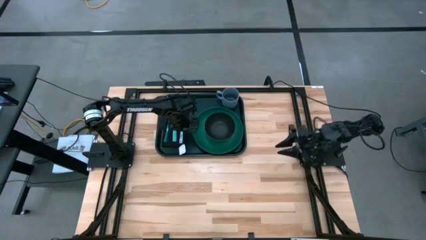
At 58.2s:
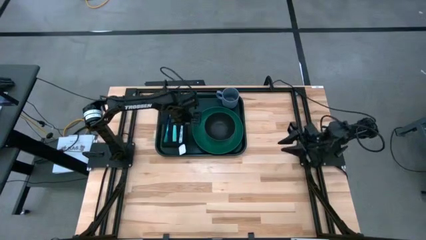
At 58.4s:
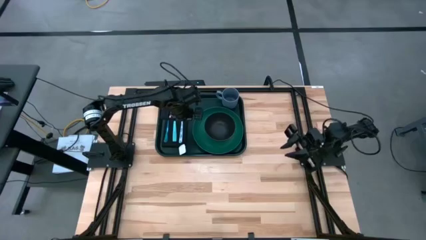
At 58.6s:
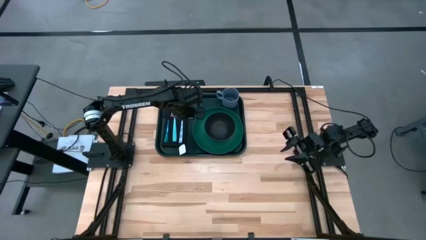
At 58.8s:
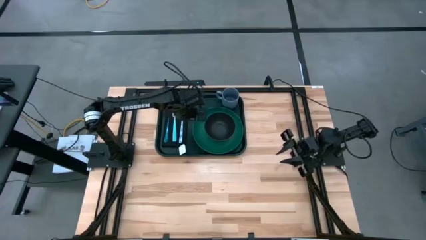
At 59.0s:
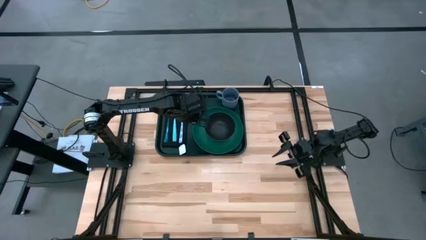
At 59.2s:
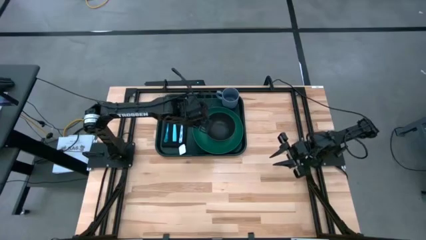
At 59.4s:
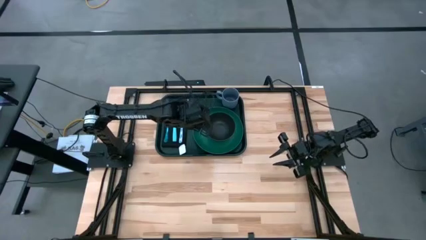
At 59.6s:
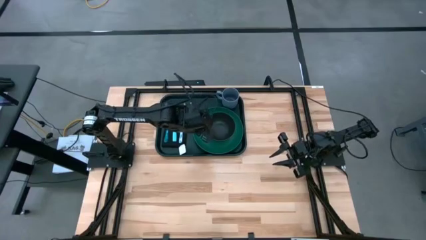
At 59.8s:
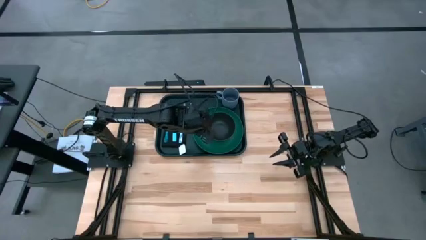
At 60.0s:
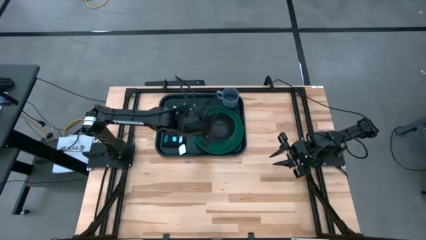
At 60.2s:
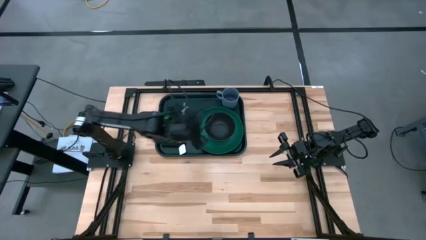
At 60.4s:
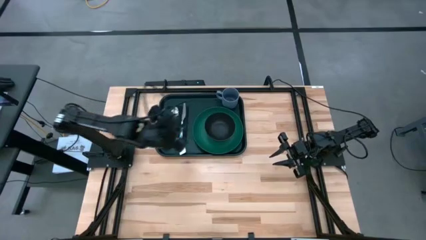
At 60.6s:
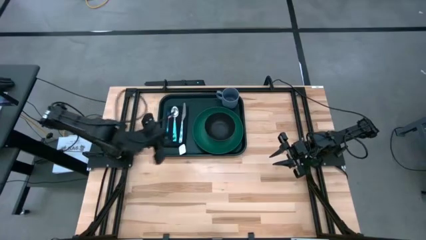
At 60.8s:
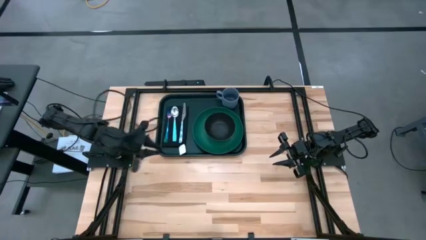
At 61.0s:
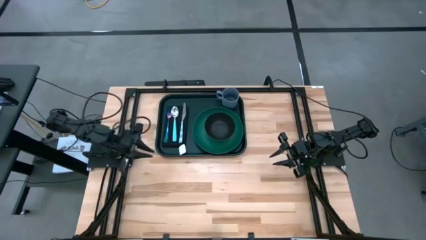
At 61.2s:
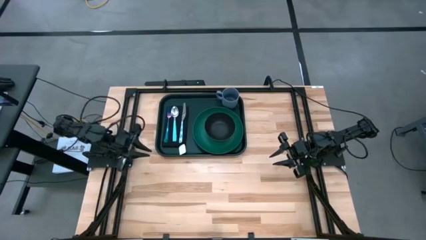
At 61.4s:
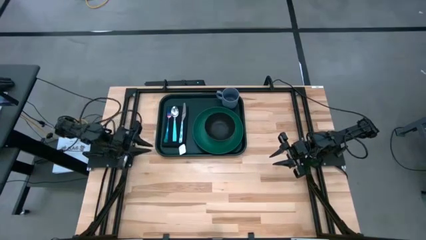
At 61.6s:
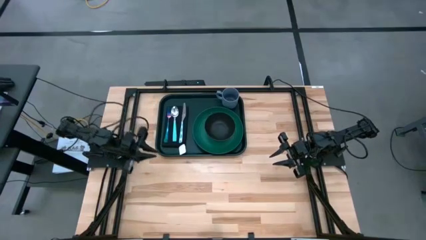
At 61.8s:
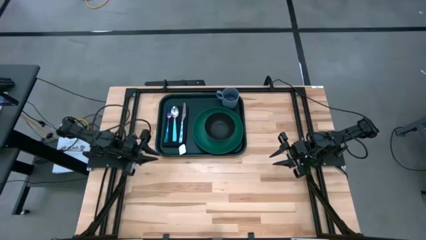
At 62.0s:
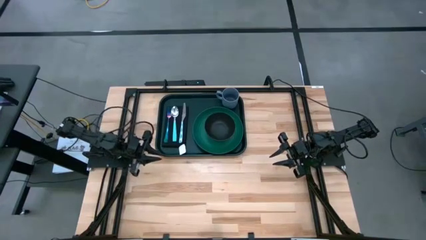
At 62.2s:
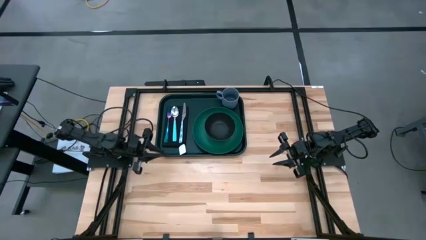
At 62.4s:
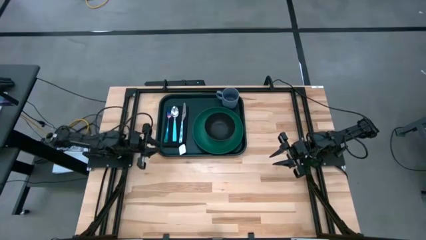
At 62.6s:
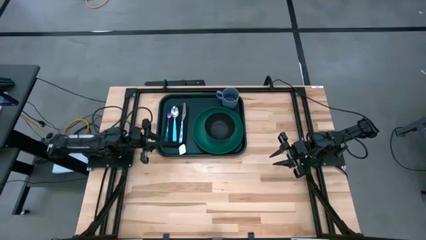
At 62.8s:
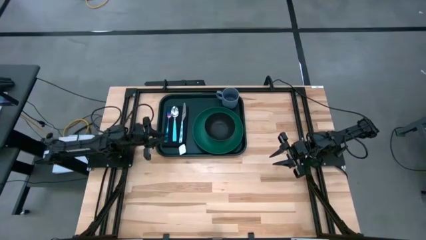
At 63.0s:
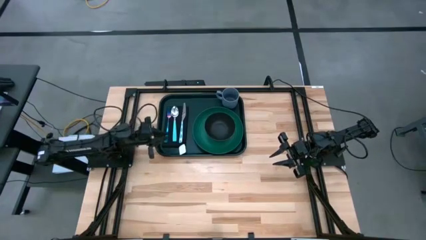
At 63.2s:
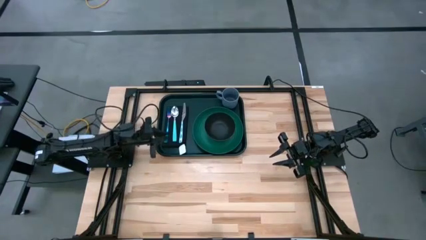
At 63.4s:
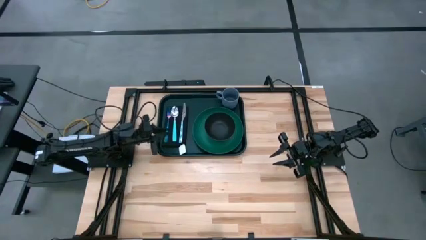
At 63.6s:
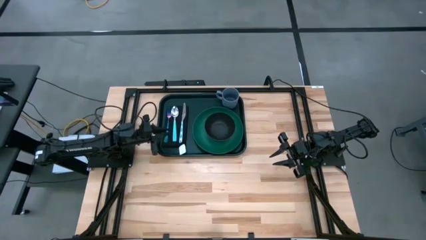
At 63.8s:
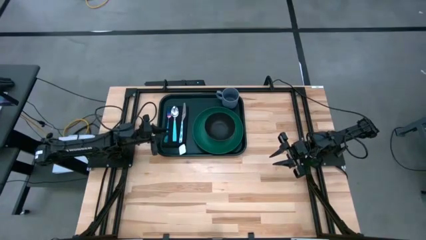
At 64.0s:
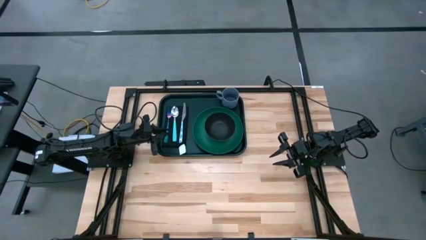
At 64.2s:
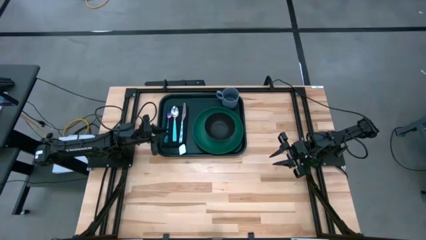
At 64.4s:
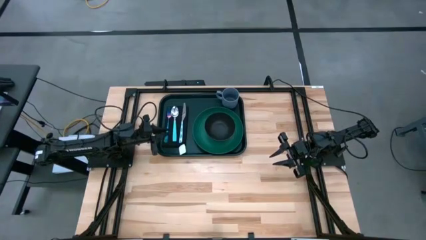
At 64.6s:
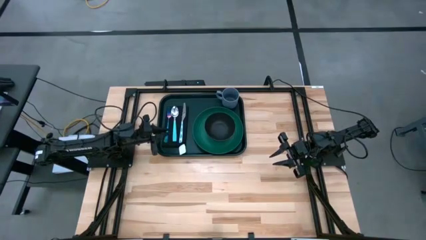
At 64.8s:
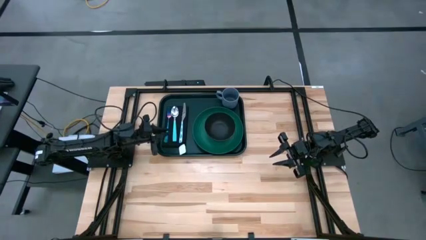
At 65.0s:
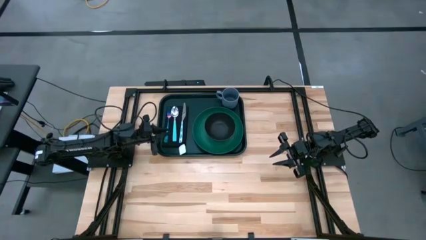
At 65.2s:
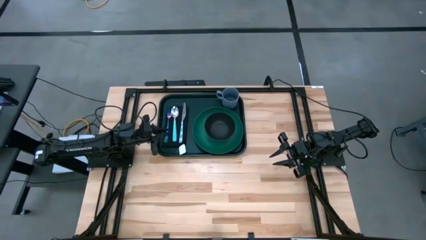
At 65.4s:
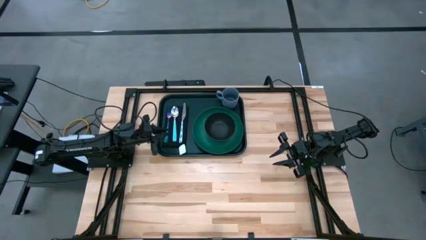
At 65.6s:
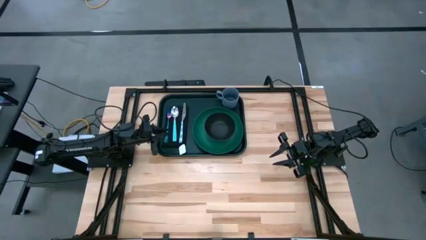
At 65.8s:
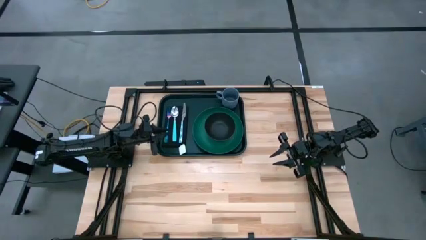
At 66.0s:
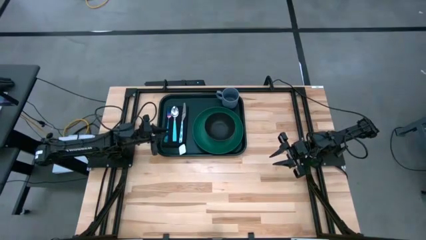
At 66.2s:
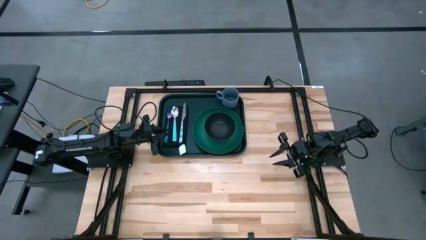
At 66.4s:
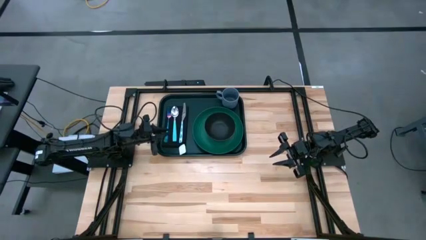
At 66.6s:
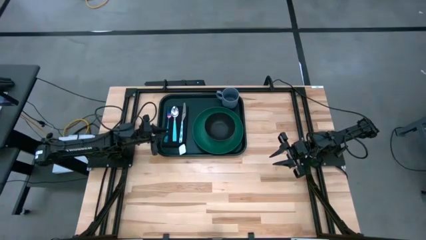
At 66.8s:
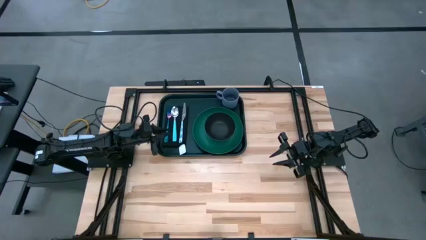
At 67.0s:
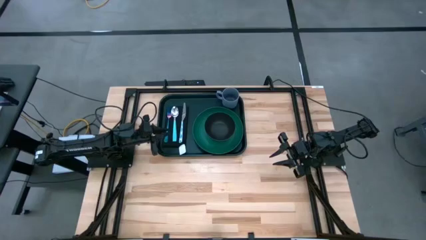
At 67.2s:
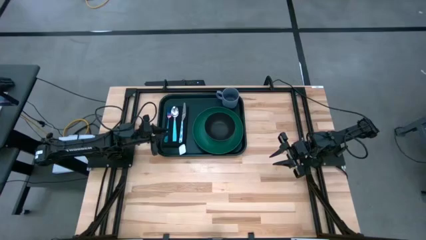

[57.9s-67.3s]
Task: Set up tray
Return to Home Position

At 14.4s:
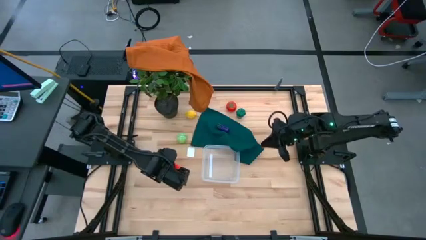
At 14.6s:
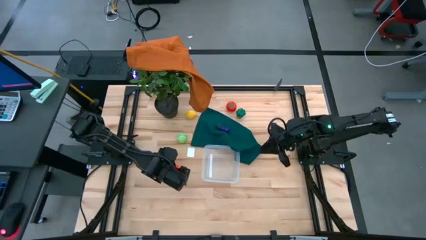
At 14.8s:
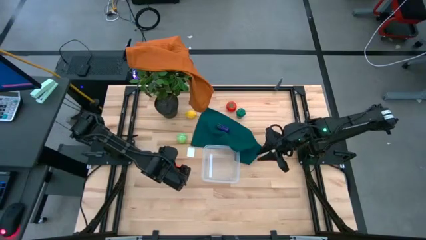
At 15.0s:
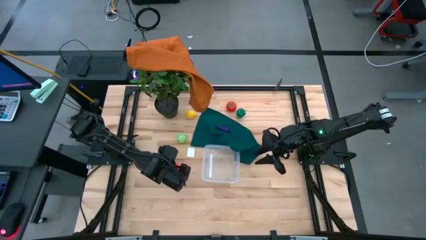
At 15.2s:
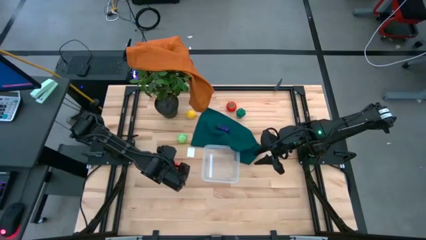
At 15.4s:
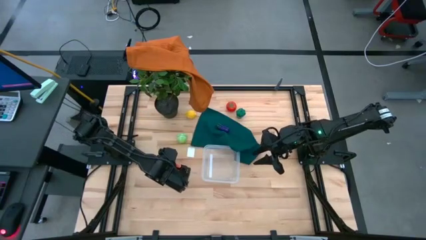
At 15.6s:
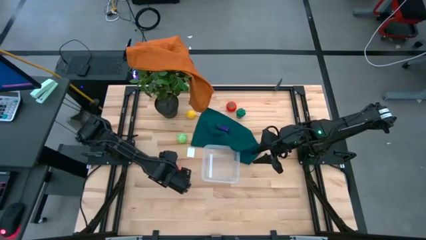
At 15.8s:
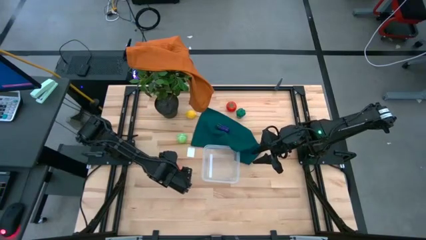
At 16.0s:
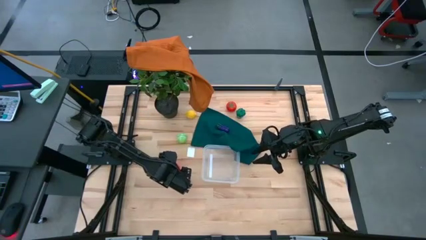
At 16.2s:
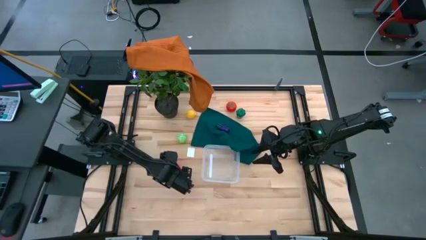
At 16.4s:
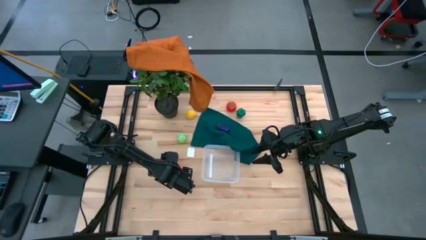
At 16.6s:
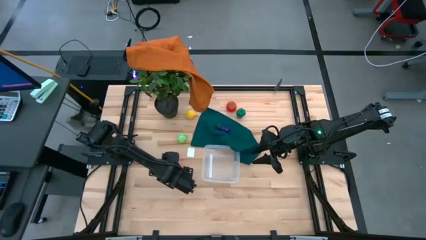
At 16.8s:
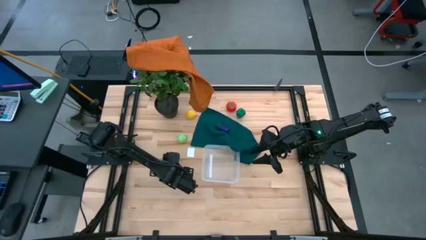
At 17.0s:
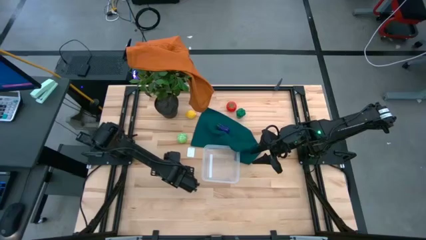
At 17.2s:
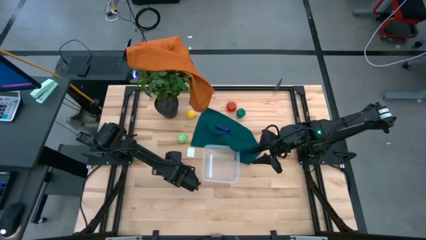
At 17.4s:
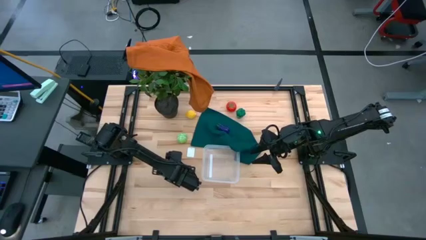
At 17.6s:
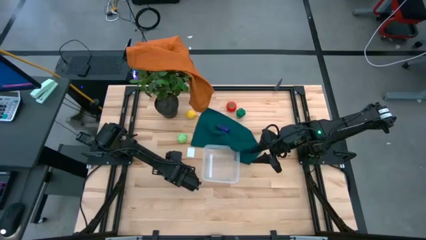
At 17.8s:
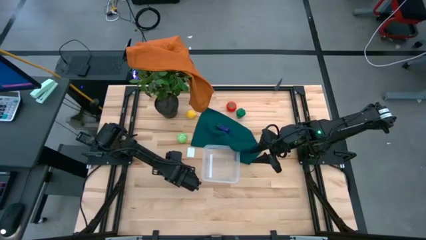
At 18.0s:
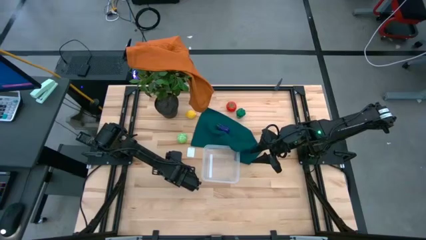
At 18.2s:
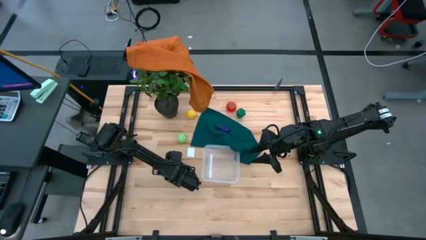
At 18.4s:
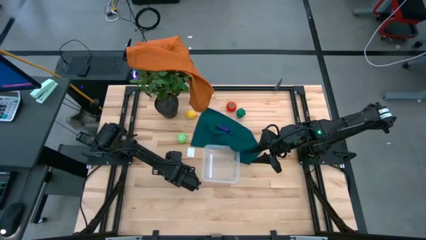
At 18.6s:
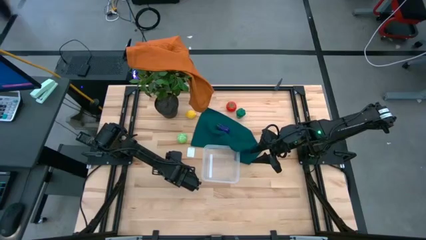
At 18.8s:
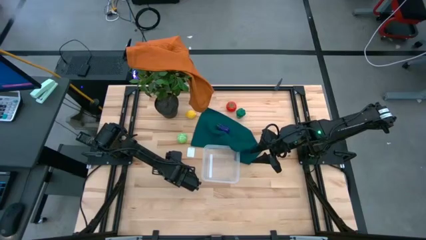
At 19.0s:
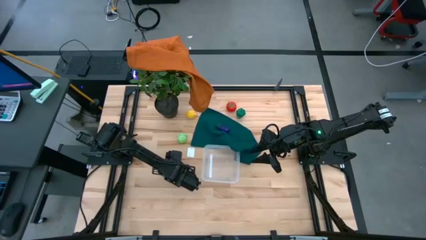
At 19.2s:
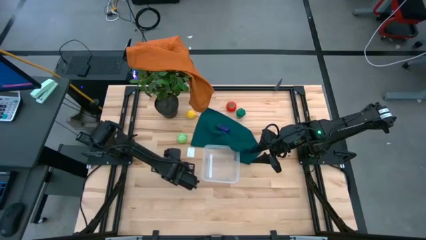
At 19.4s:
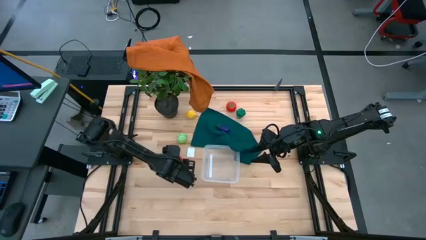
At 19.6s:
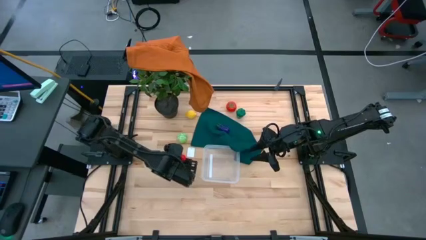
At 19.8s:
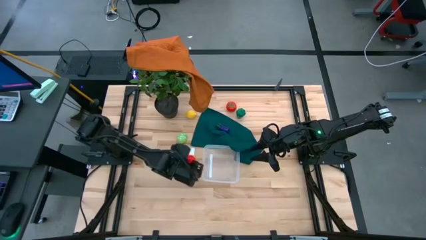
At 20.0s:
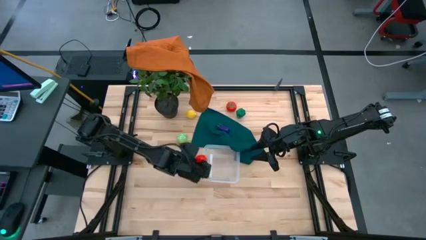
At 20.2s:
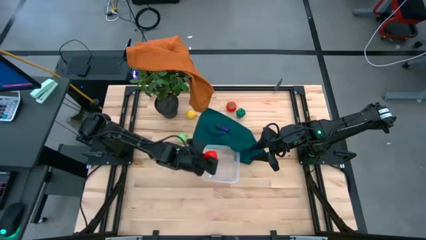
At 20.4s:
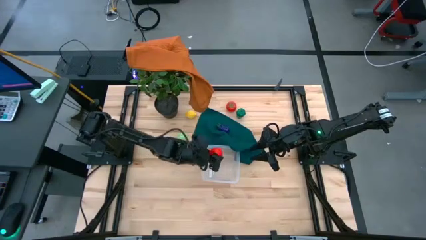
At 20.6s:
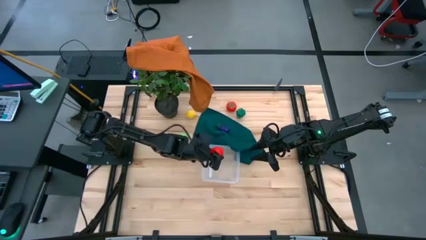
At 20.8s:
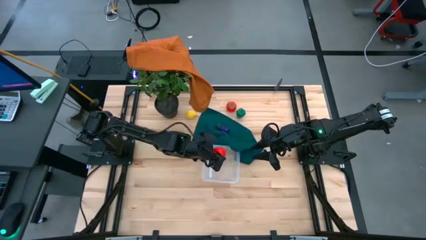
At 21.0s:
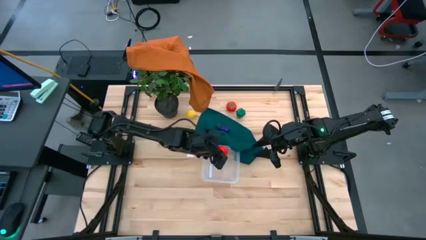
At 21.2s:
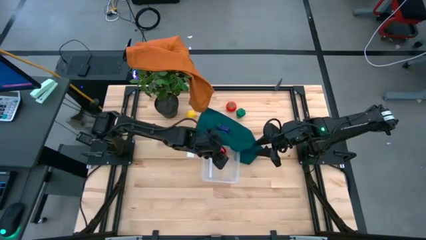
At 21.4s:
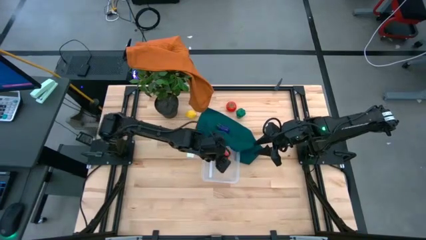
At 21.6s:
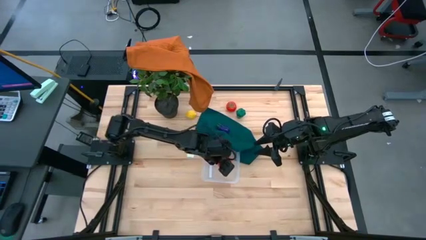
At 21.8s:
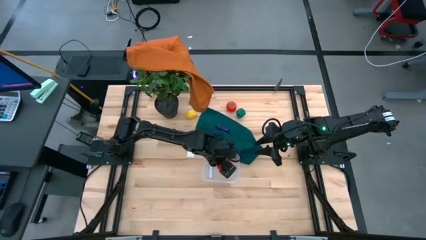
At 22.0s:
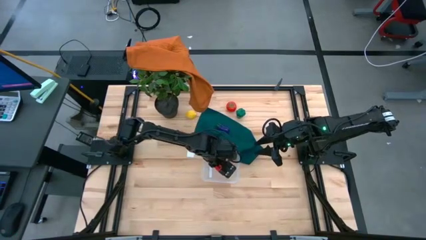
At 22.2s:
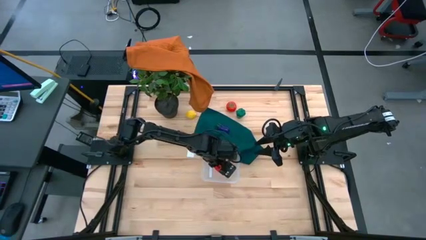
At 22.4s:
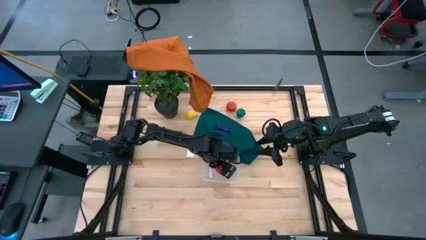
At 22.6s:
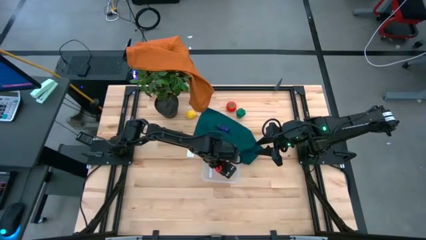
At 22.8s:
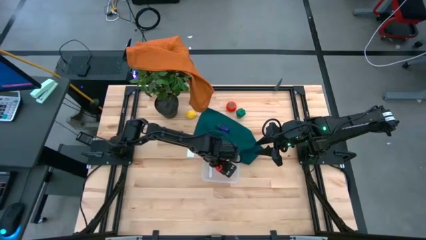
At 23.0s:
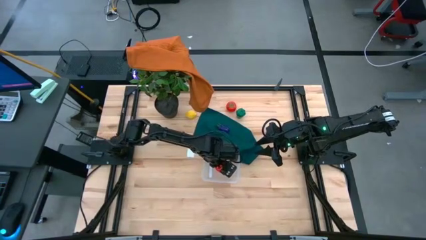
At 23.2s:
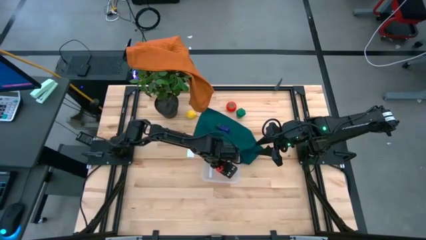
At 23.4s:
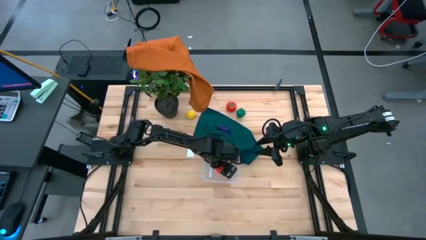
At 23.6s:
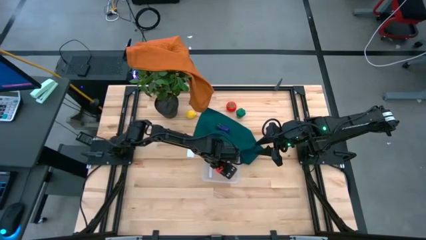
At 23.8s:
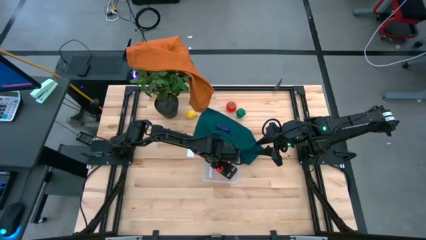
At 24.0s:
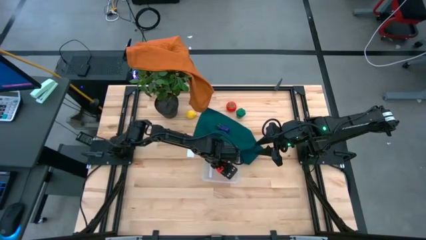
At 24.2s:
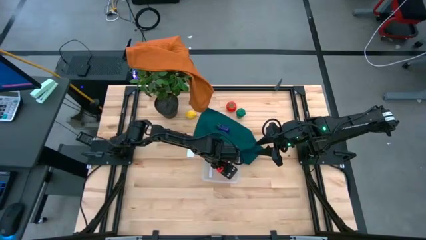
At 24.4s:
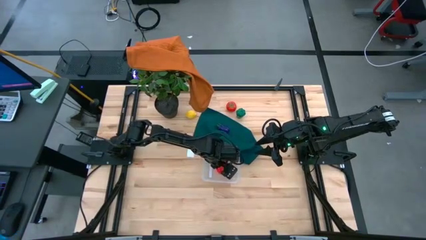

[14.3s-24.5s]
Task: Pick and placing Produce into tupperware
Put the apple into the transparent basket
